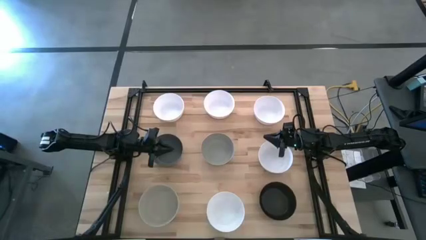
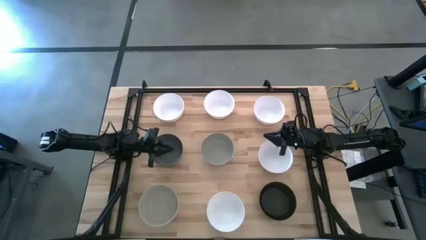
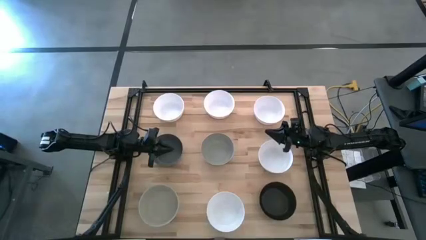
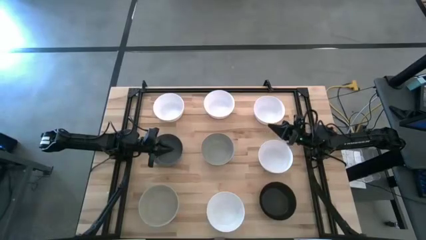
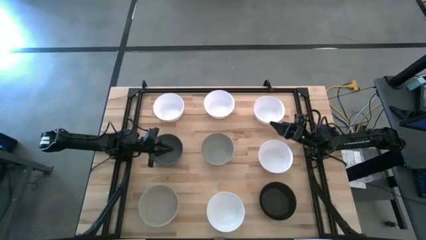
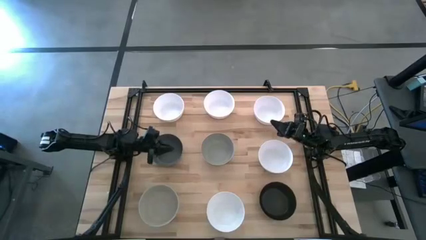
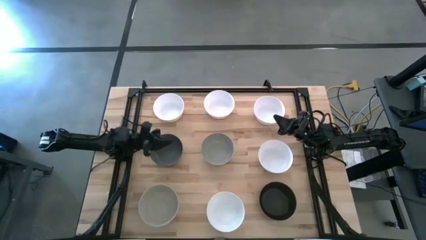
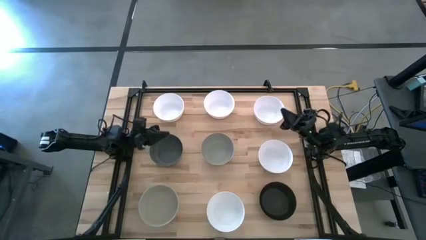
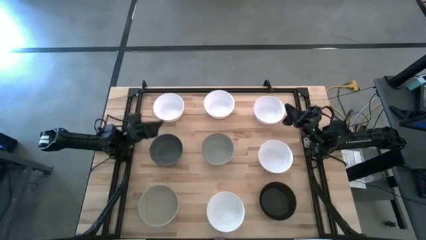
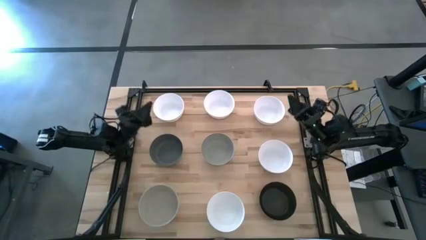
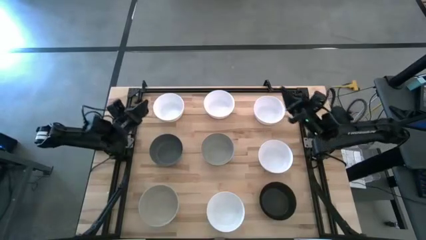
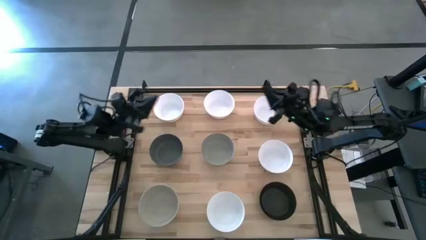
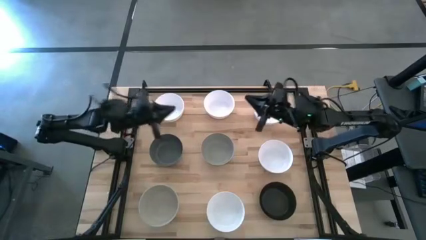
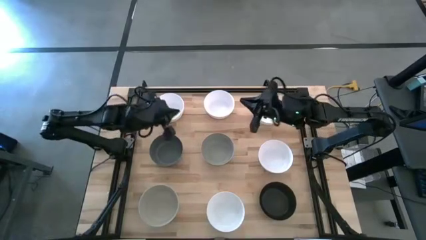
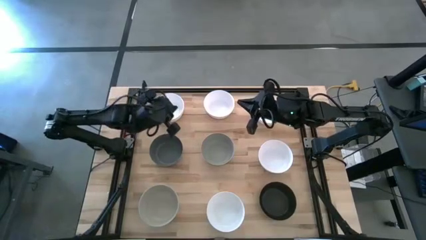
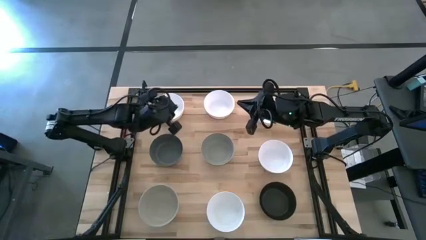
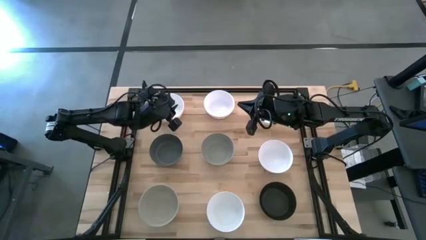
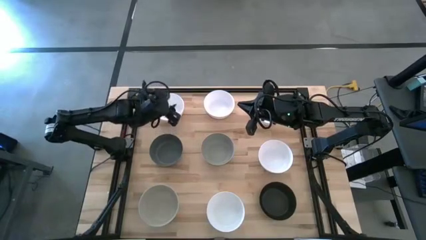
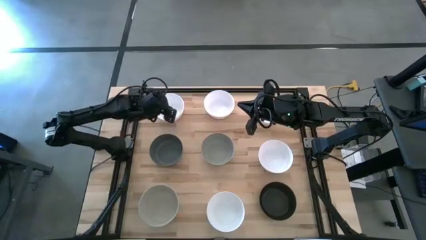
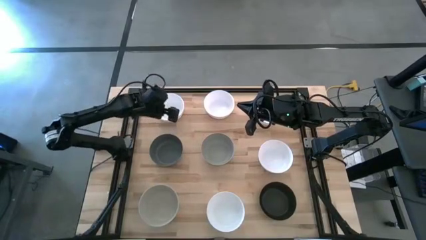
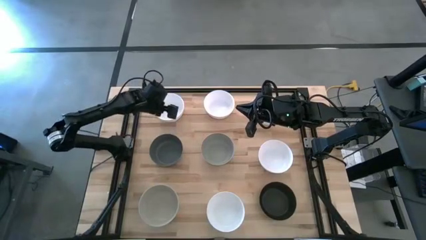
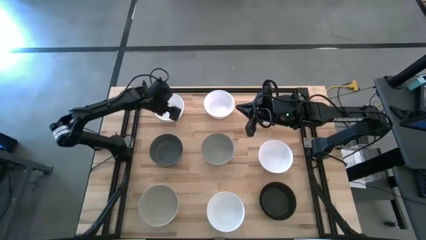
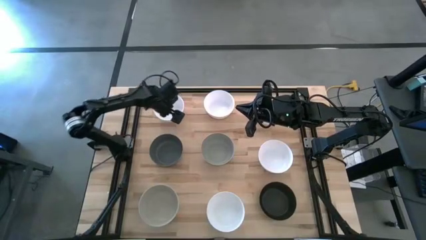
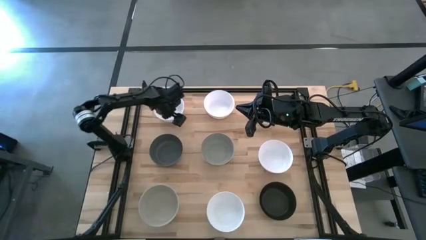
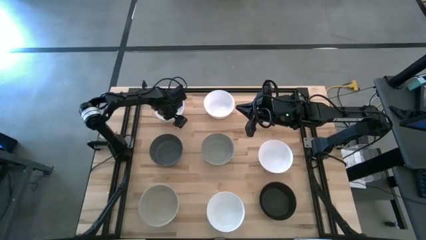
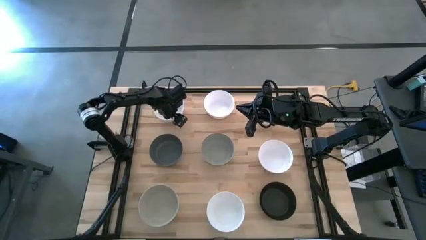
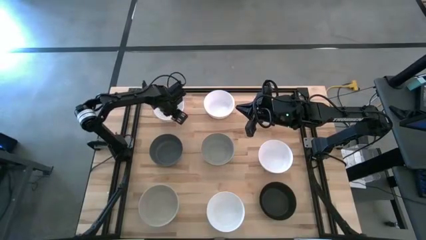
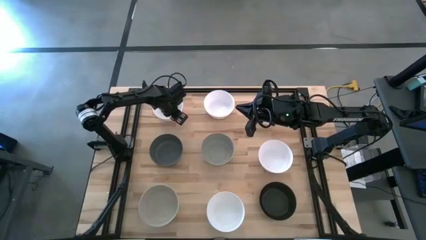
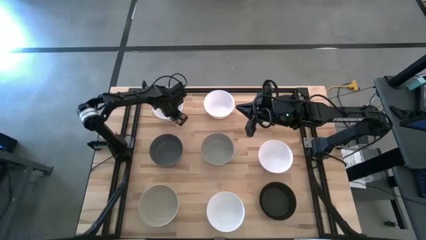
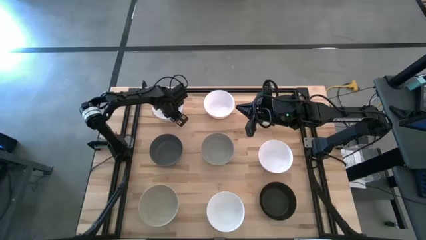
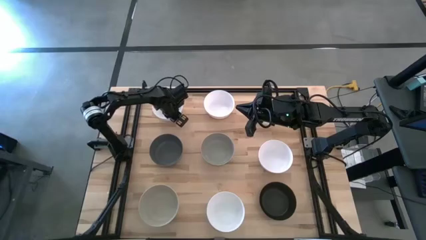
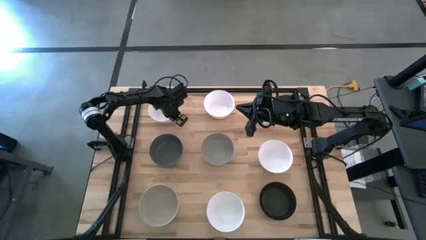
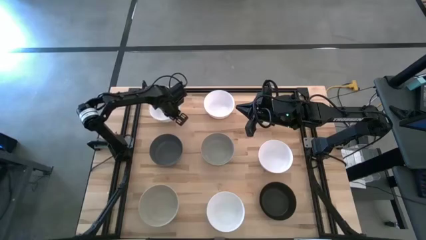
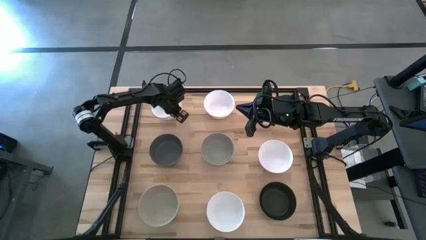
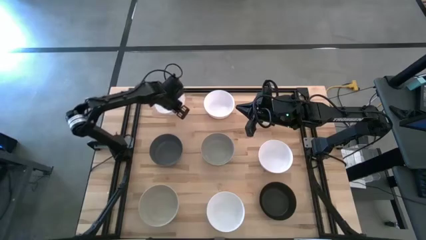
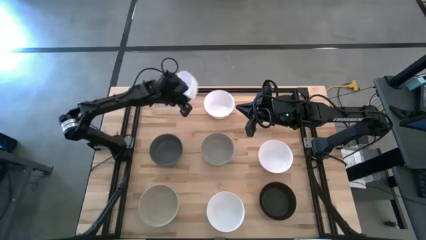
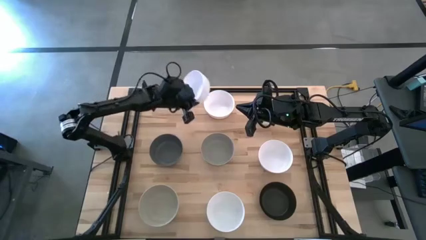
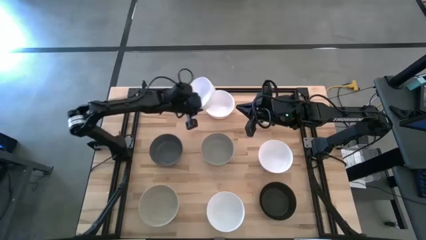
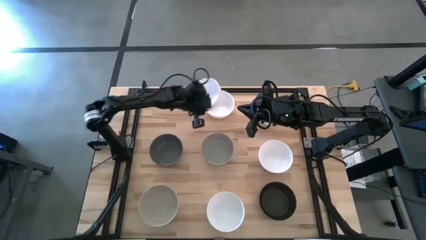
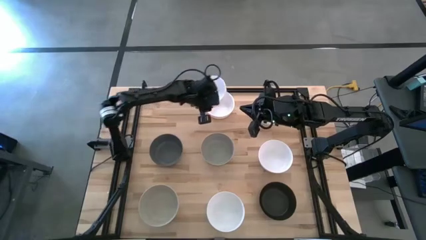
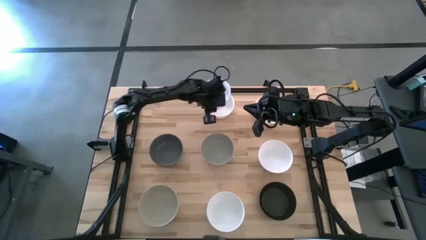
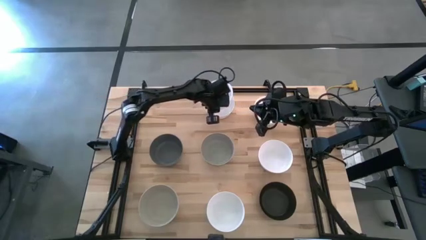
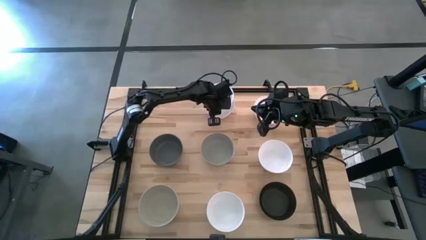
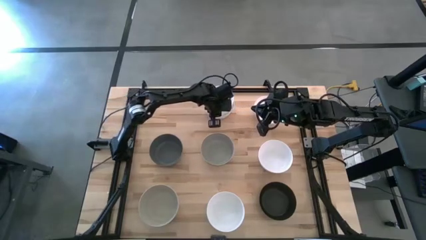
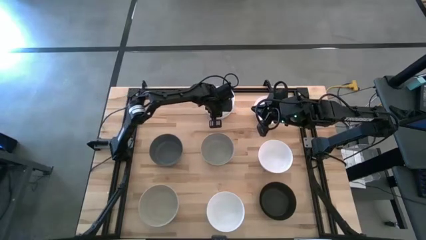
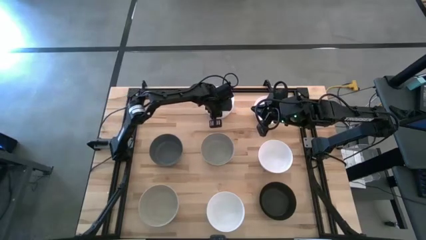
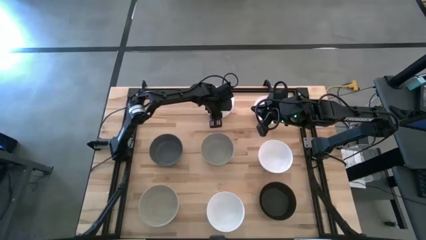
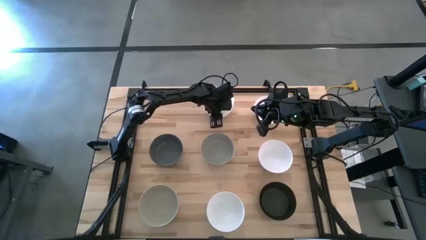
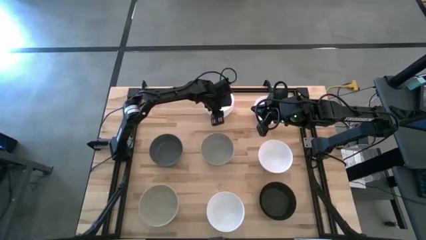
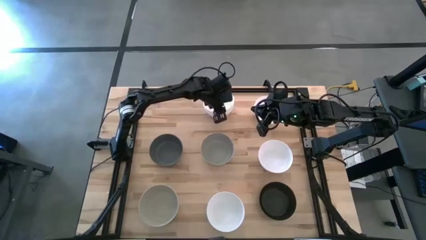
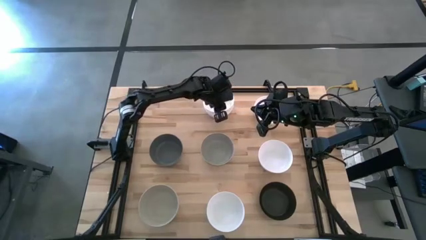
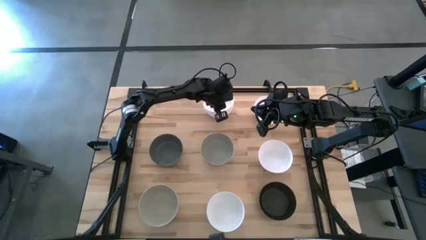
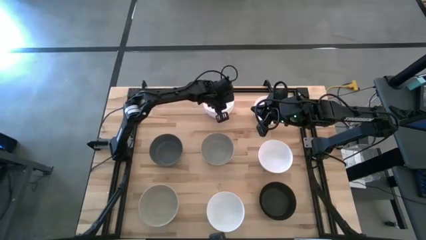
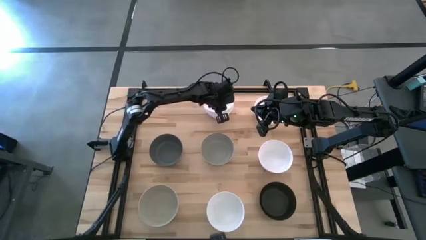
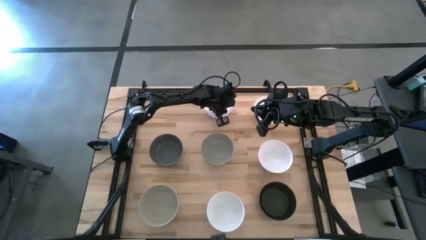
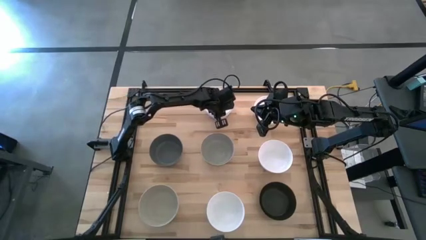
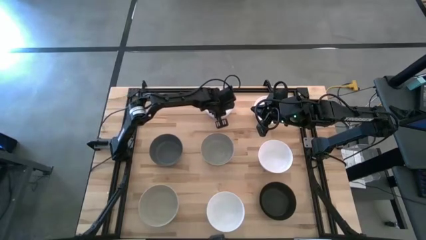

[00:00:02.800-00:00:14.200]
Task: Nest bowls inside each other
Stack the white bowl on the other white bowl

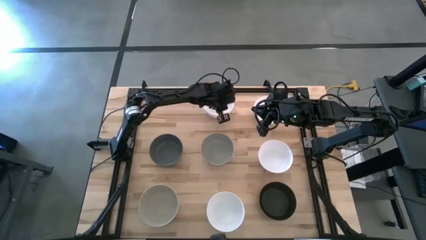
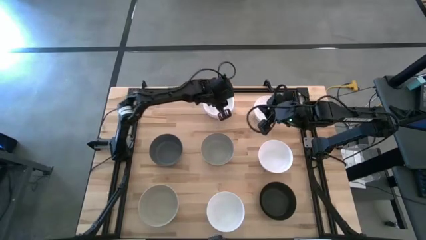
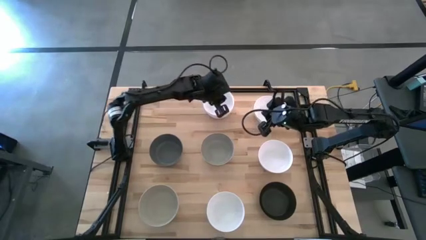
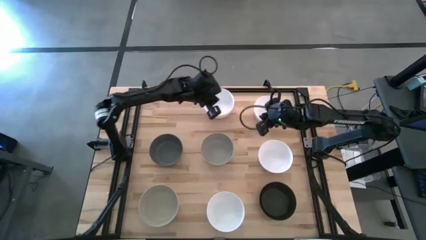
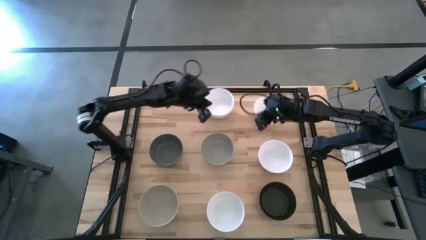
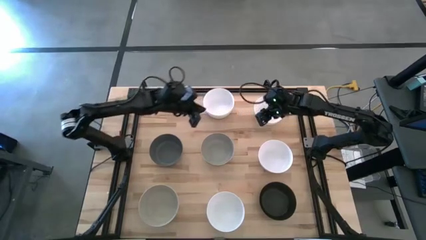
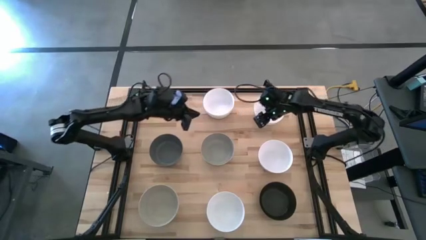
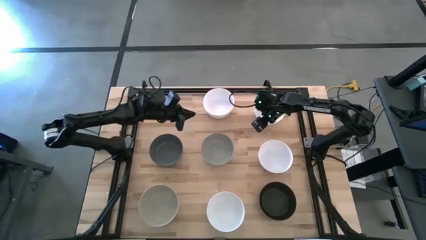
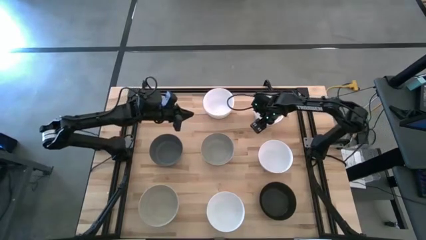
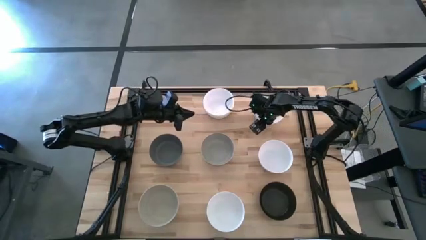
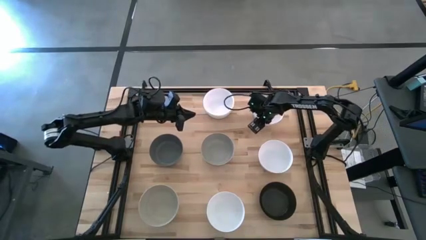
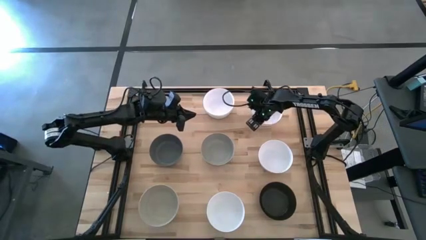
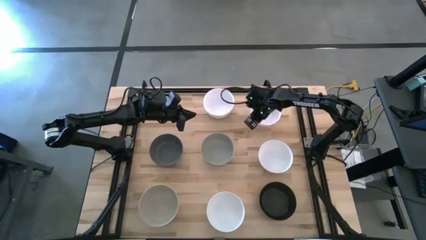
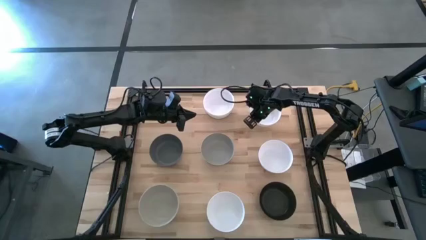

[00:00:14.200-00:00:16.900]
Stack the white bowl on the stacked white bowl
